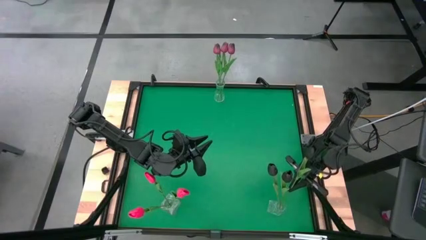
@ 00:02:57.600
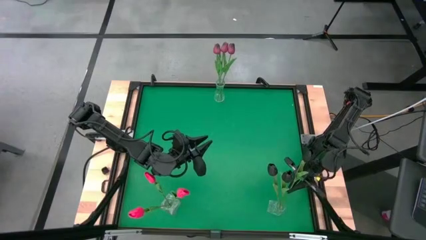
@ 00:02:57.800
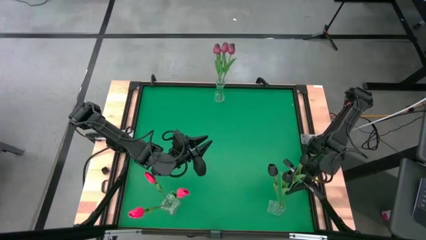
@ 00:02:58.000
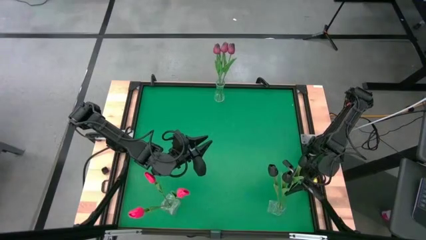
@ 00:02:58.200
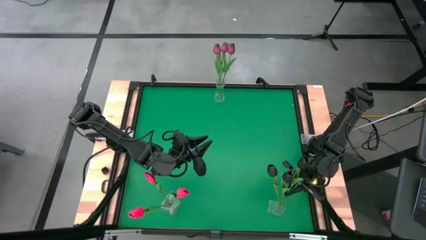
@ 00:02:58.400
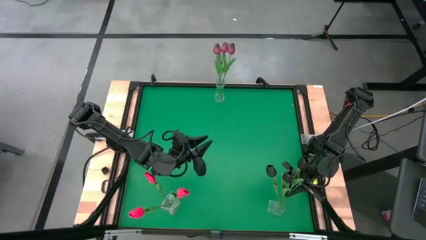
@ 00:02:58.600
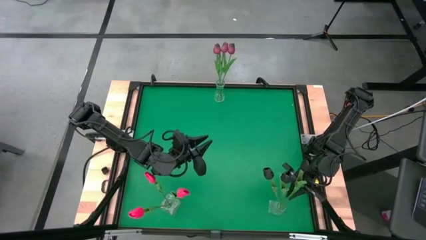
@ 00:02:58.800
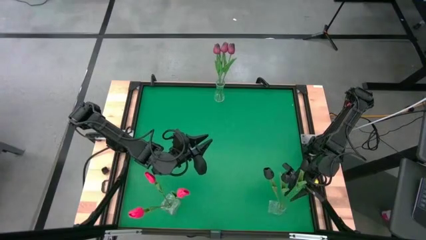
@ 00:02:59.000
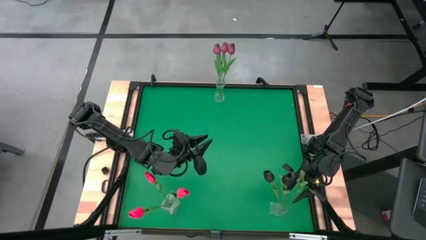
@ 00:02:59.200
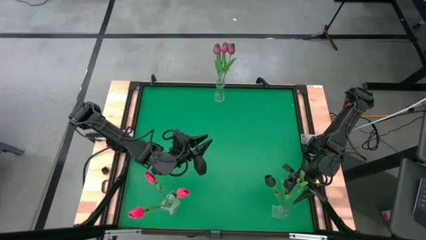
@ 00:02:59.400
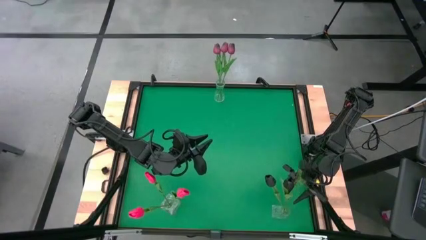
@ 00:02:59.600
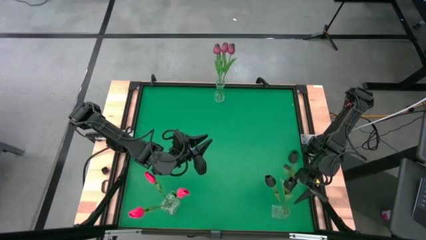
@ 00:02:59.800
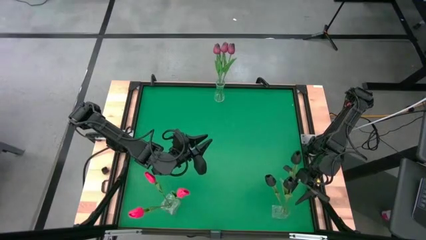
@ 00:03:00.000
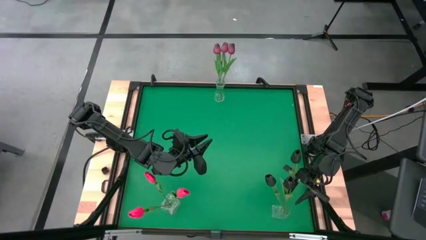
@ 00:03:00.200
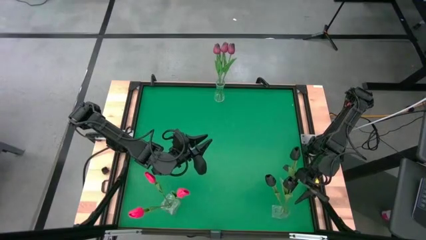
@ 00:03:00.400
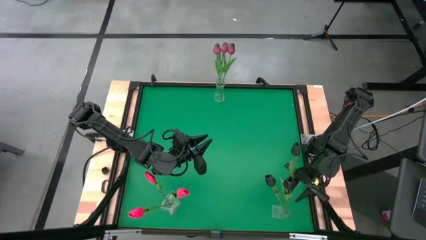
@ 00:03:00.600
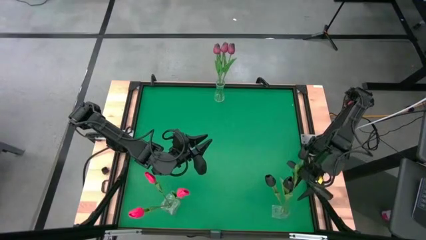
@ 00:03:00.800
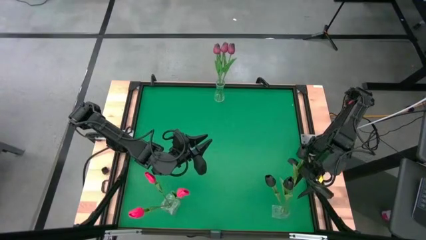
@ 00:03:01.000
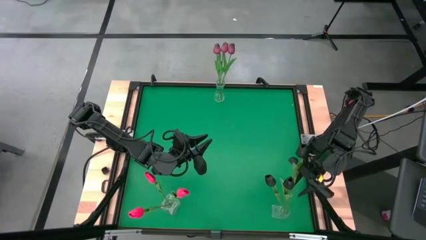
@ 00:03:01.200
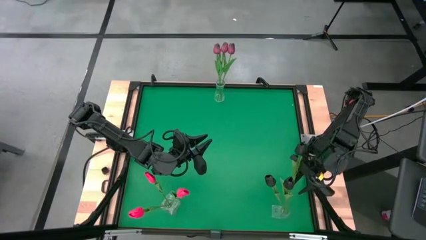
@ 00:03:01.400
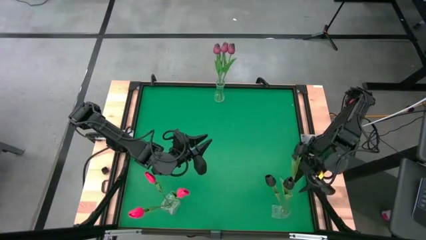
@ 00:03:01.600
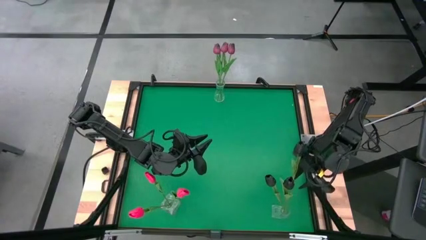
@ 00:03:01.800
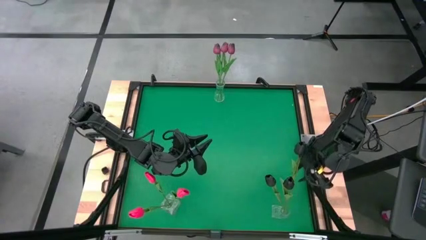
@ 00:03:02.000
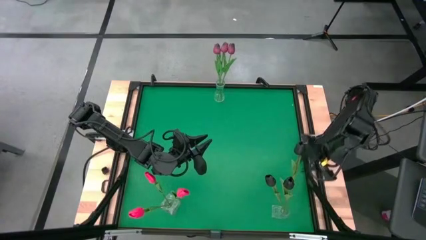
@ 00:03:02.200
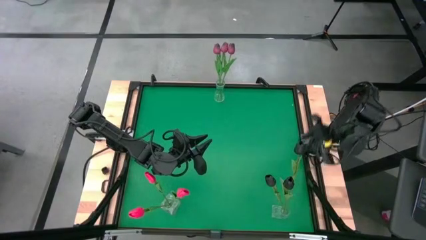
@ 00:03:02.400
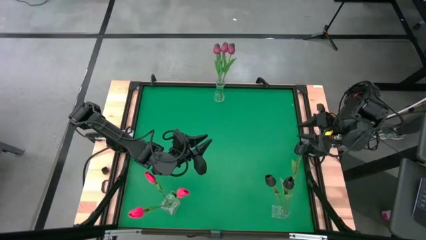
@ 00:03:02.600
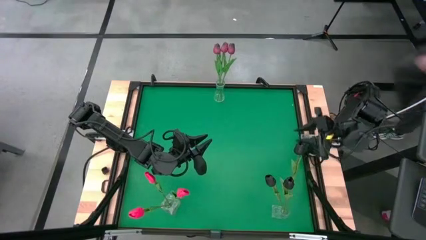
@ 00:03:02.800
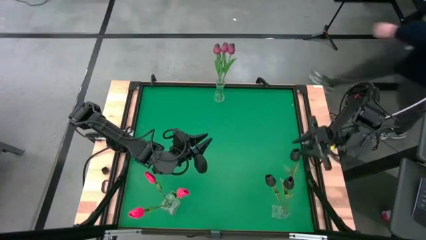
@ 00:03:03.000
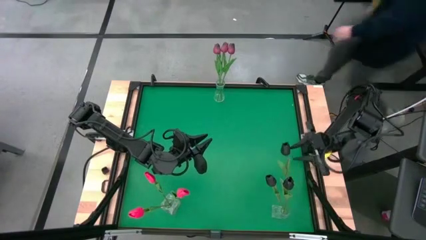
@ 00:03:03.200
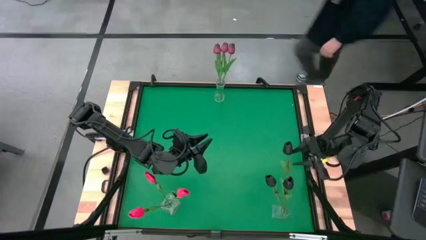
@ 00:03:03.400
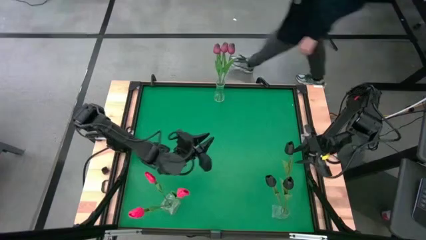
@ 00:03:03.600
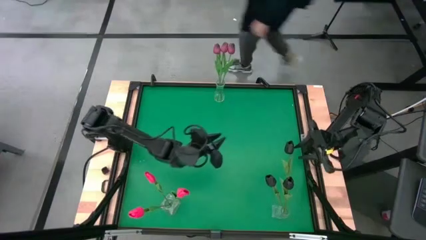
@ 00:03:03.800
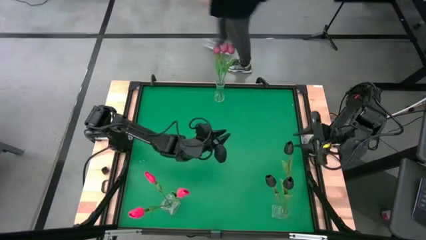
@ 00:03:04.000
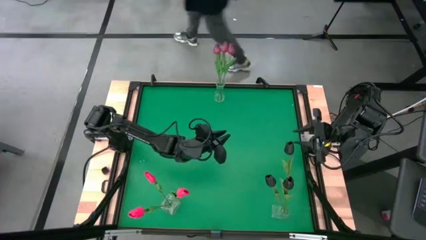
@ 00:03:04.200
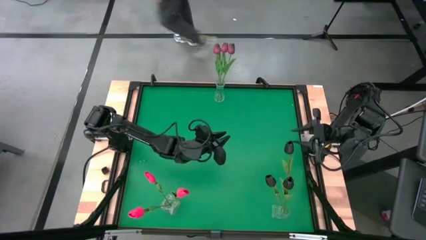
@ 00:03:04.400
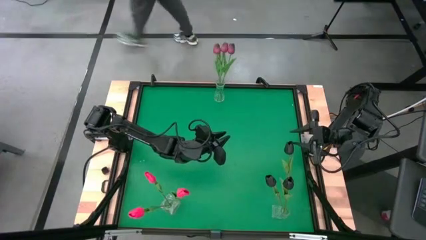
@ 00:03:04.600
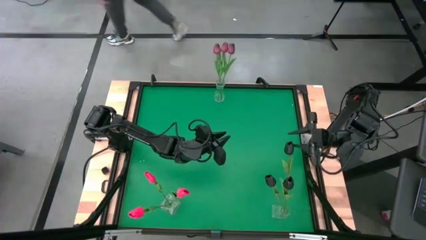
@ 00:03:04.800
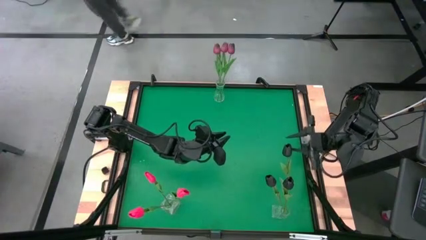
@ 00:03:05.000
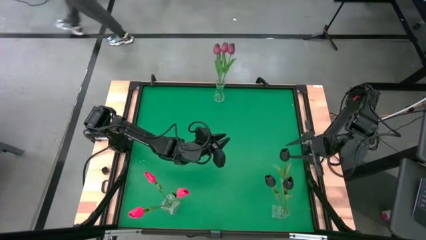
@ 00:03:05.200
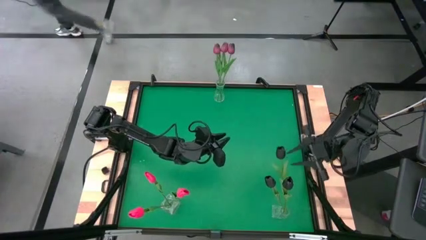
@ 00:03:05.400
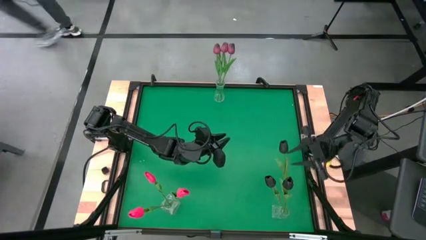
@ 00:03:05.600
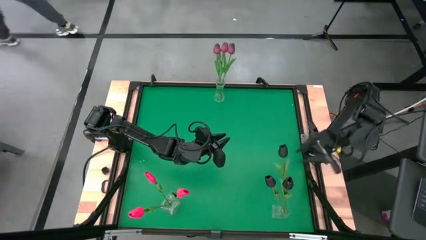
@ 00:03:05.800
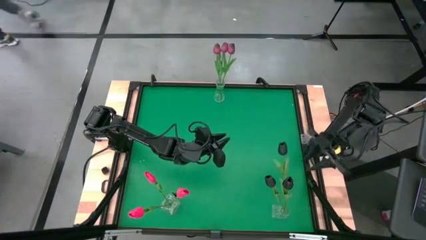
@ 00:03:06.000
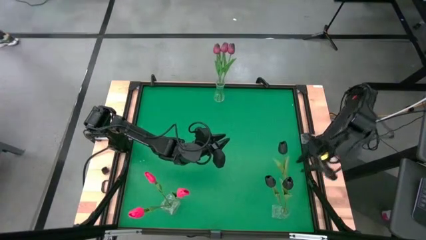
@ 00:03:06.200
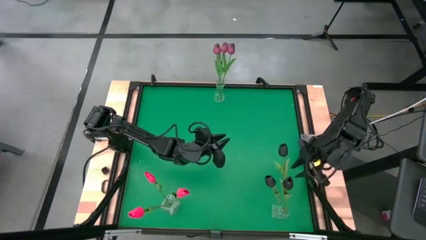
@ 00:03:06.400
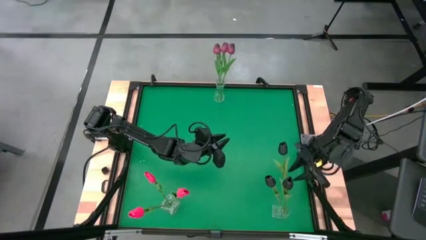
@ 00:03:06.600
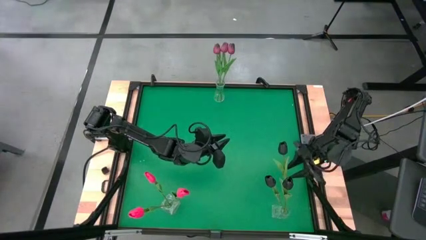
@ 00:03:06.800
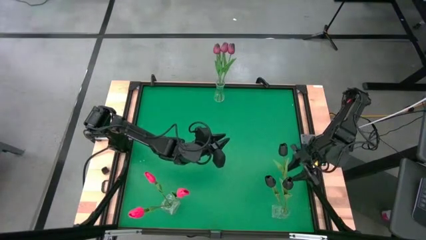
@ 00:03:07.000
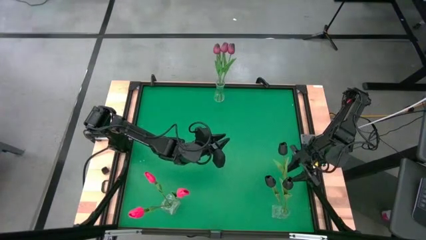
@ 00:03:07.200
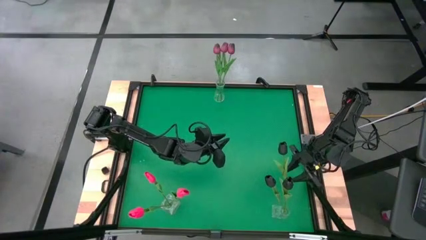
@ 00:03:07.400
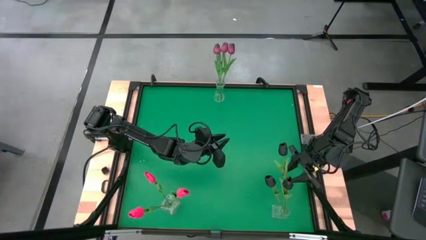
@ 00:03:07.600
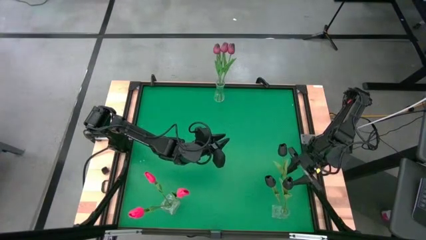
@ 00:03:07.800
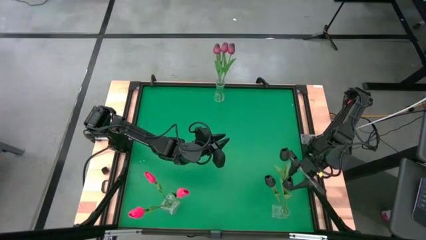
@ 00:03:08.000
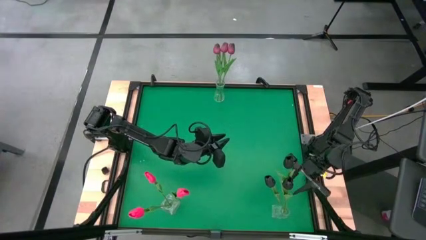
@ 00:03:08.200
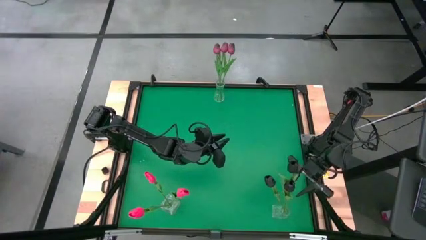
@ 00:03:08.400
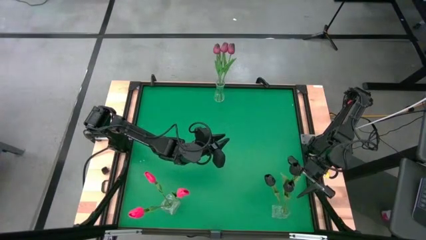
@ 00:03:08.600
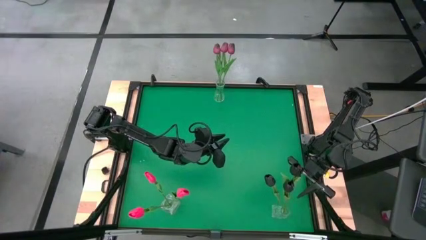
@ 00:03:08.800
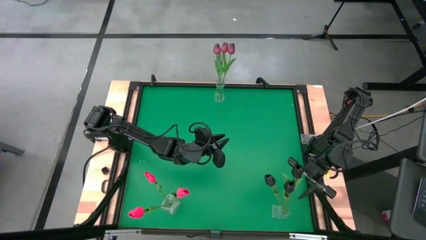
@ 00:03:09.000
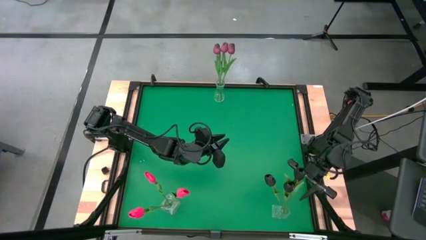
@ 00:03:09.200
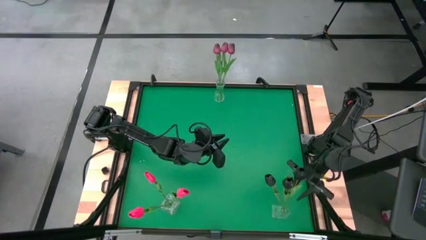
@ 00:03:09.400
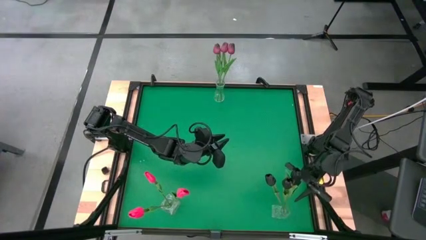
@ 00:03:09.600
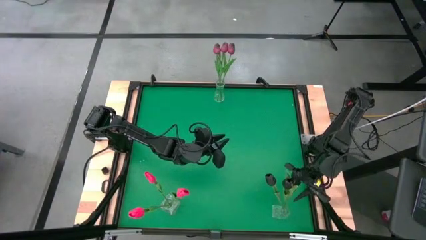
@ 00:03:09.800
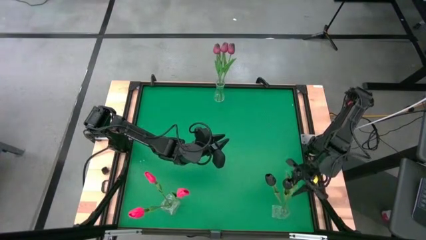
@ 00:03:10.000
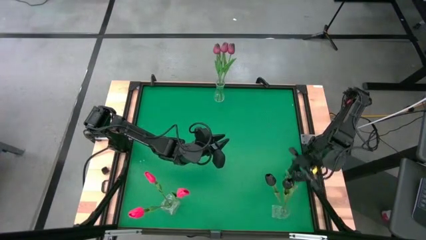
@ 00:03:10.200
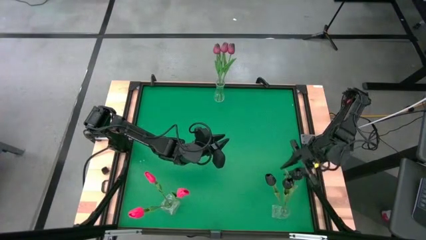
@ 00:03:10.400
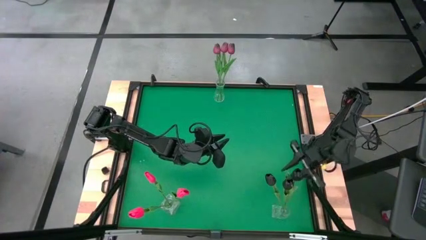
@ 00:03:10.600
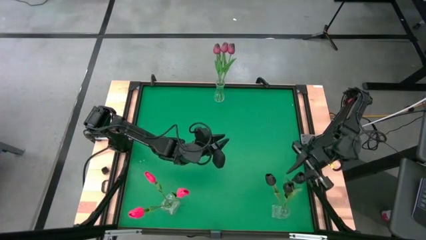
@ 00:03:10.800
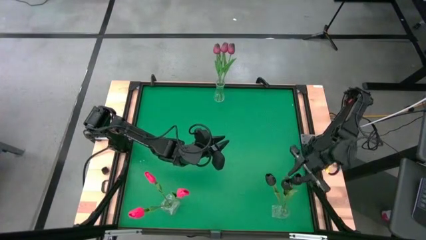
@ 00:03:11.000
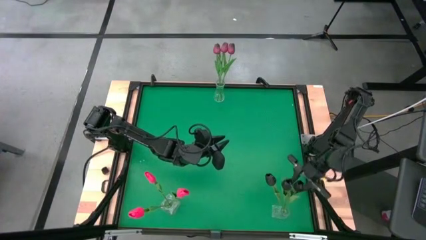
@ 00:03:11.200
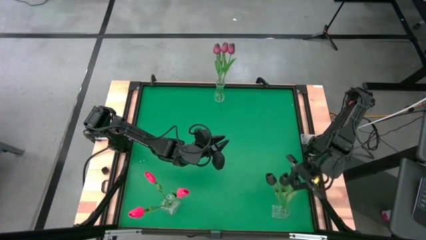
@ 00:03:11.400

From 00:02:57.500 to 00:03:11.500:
Task: Sort flowers into vase by color
Put the black tulip into the bottom right transparent vase
